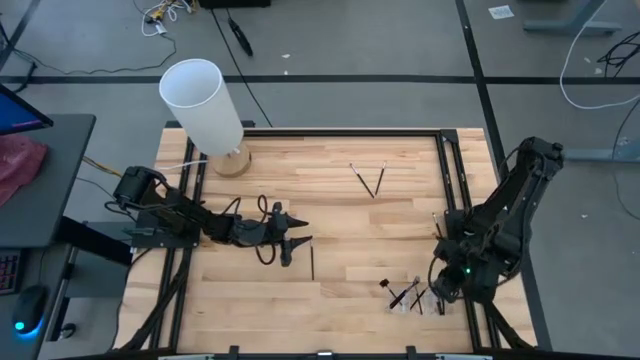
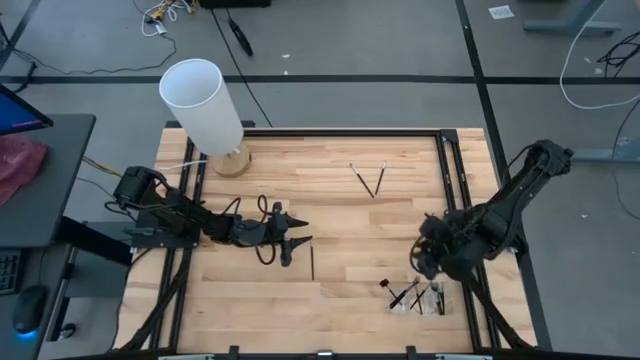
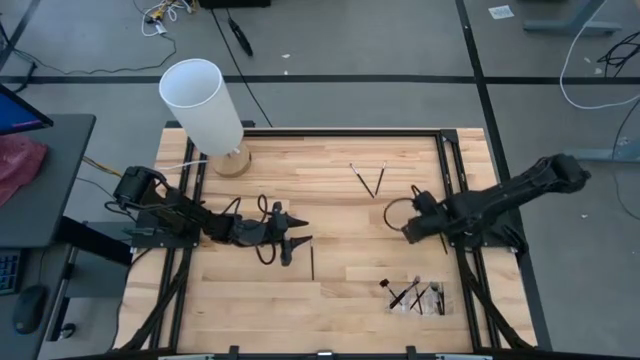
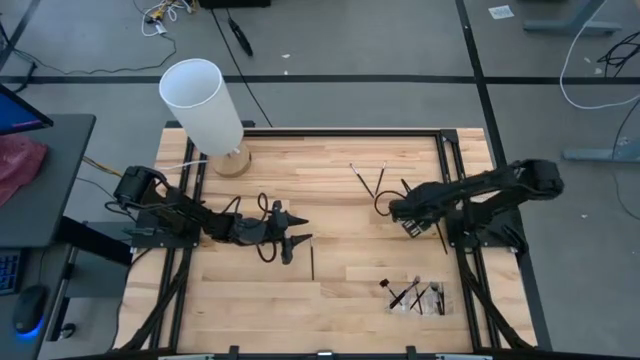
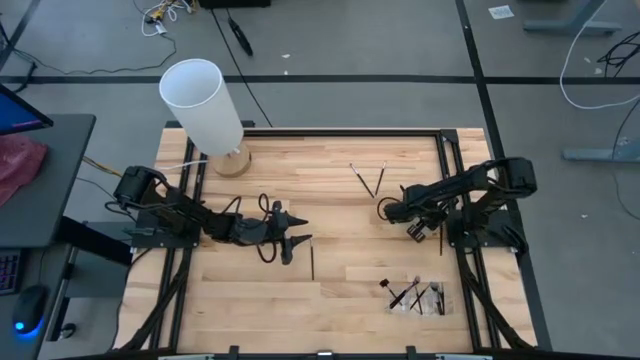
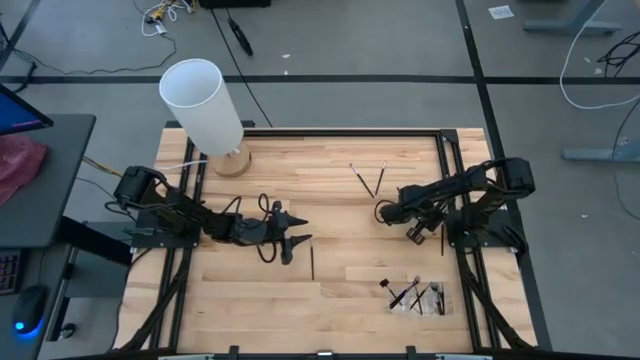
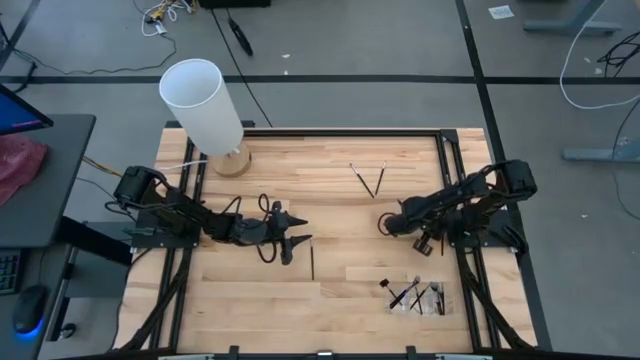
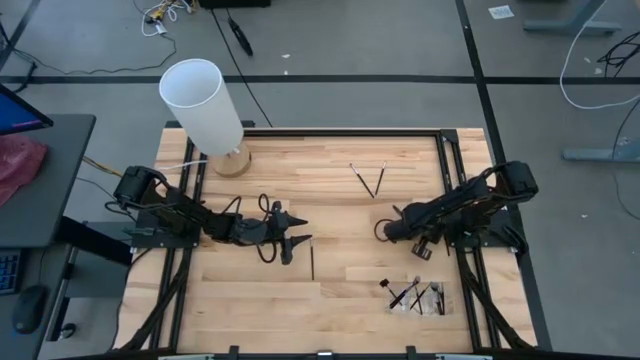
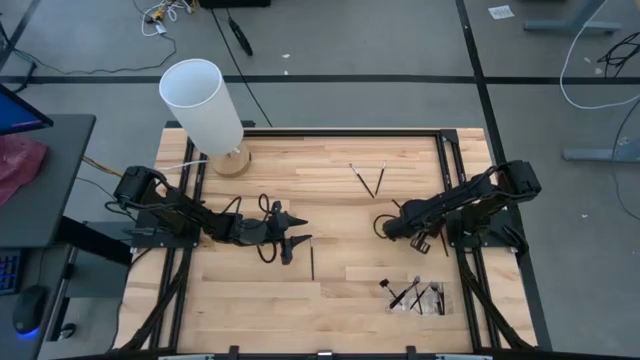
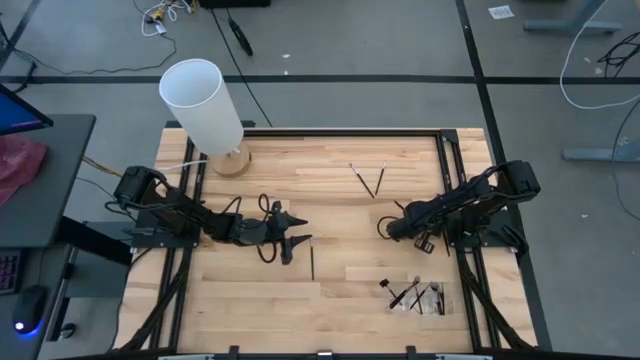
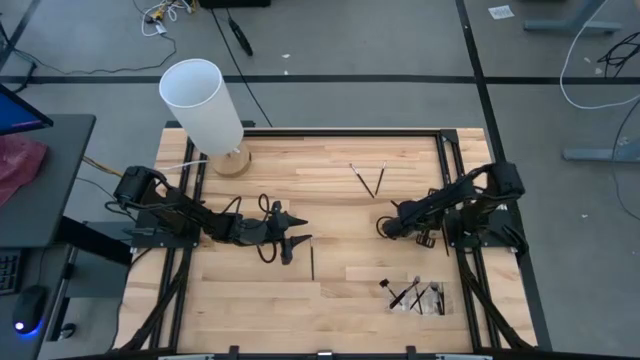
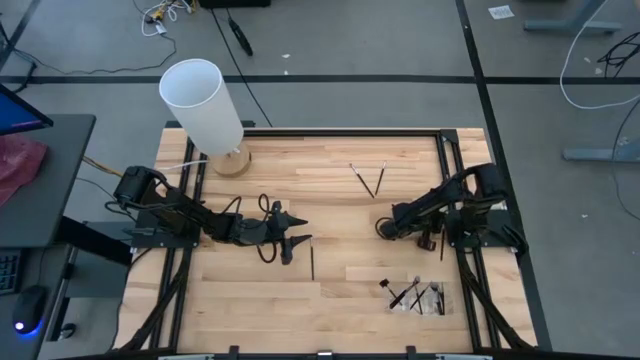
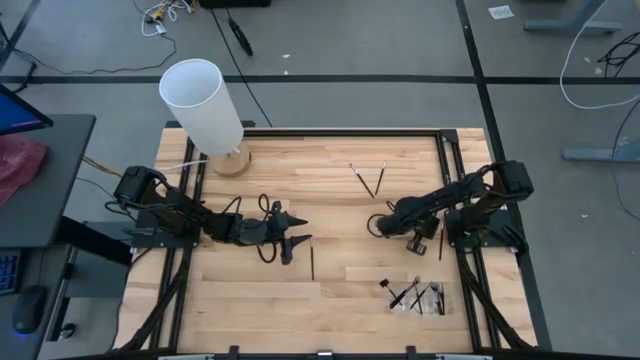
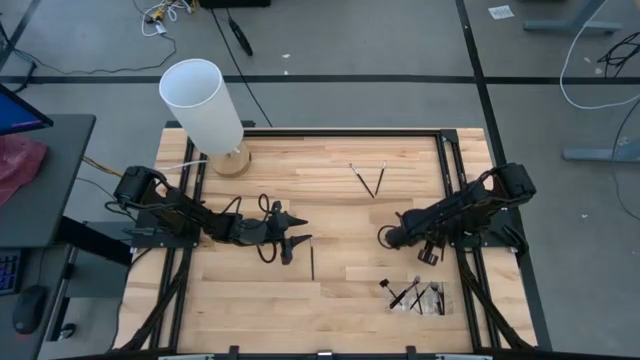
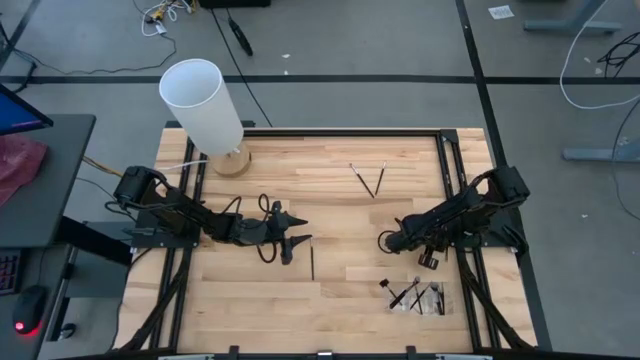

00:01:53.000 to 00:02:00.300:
Task: Pick & Place Makeup Supplies
Put the silver makeup brush into the transparent organizer

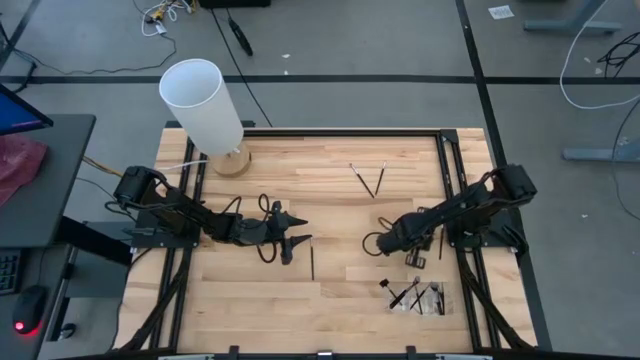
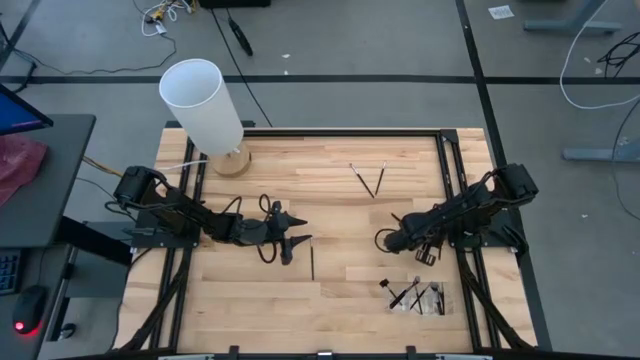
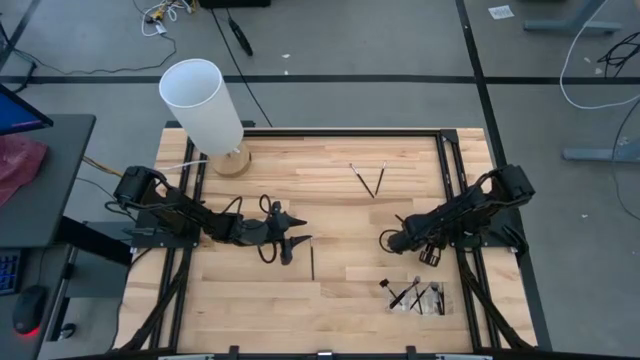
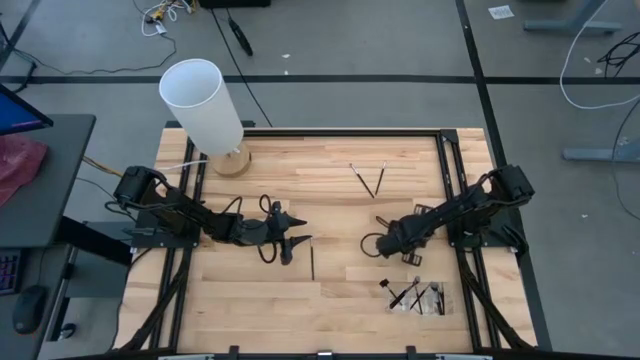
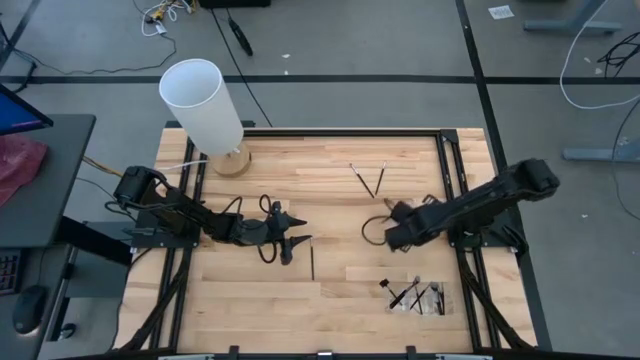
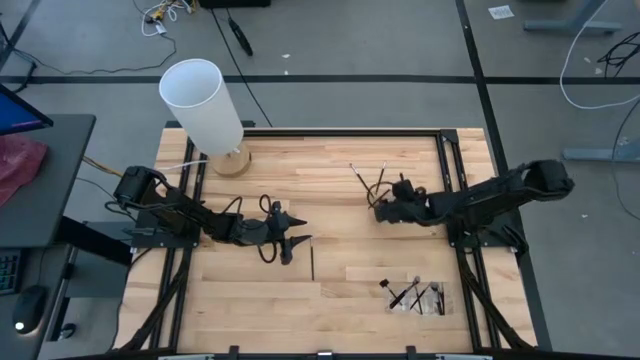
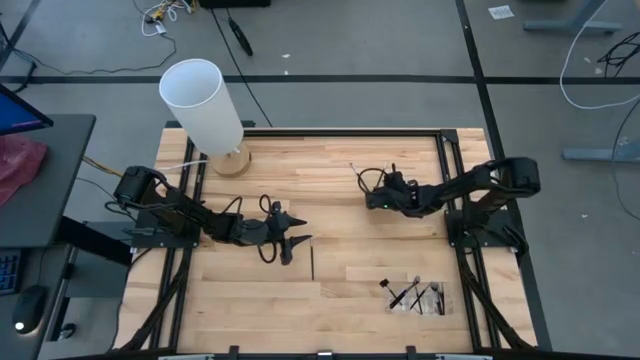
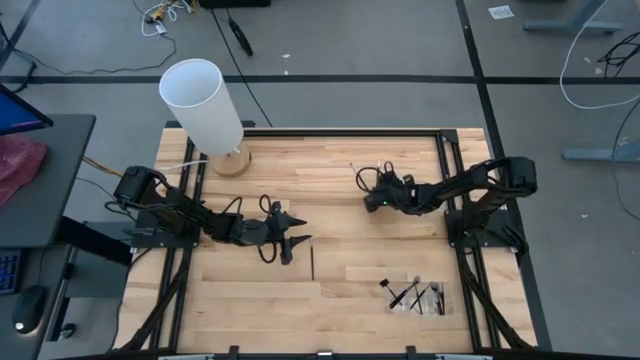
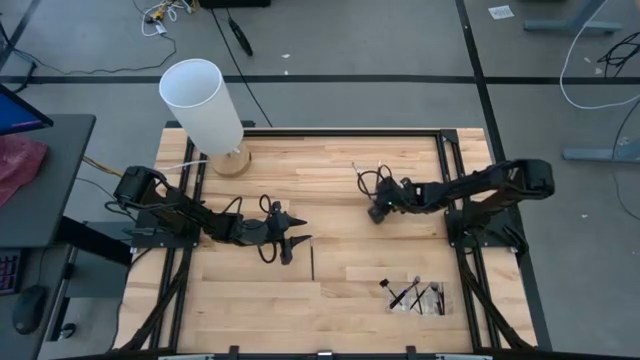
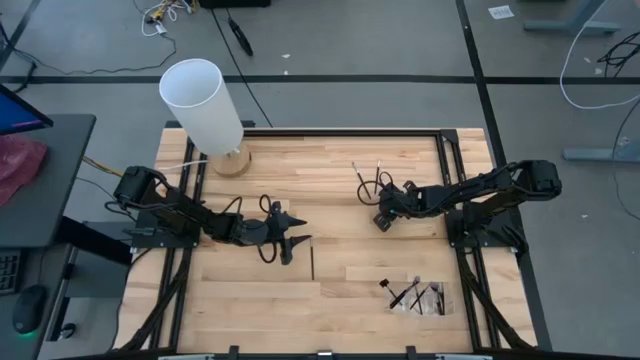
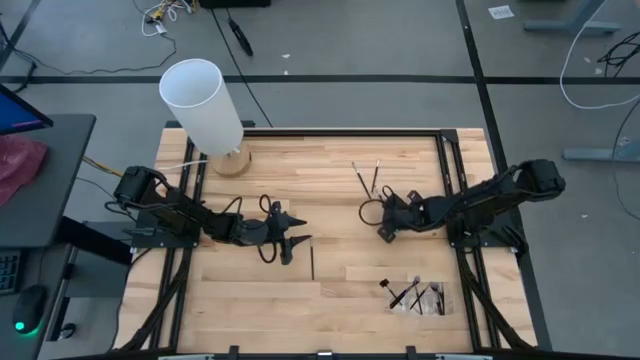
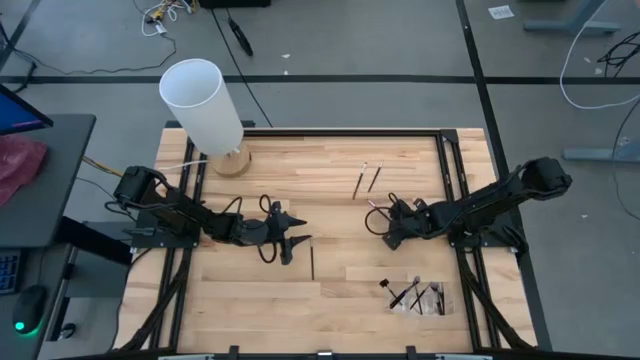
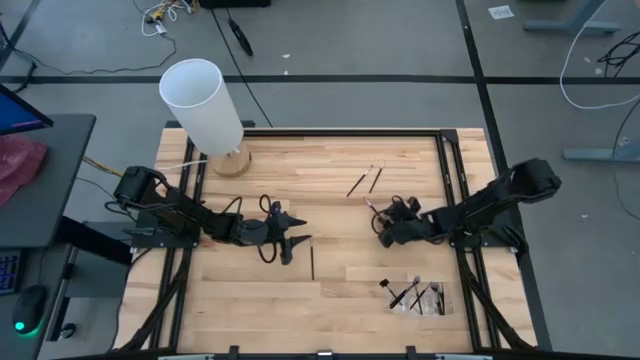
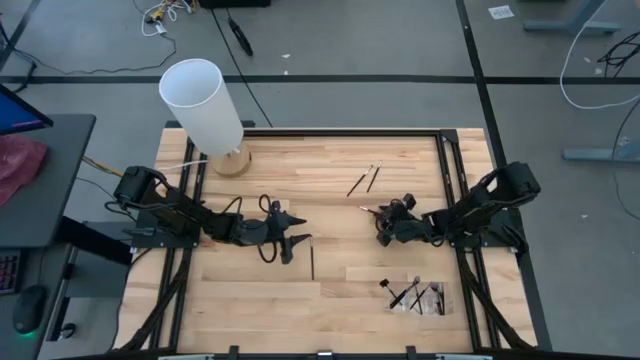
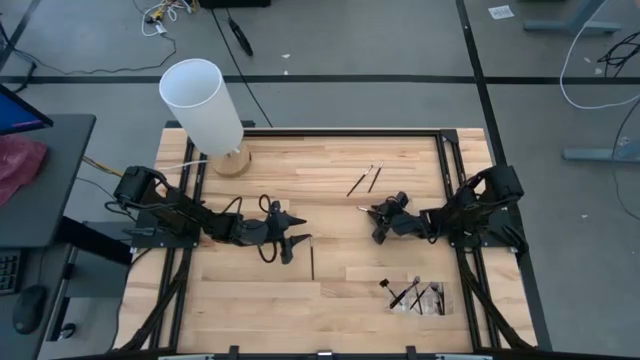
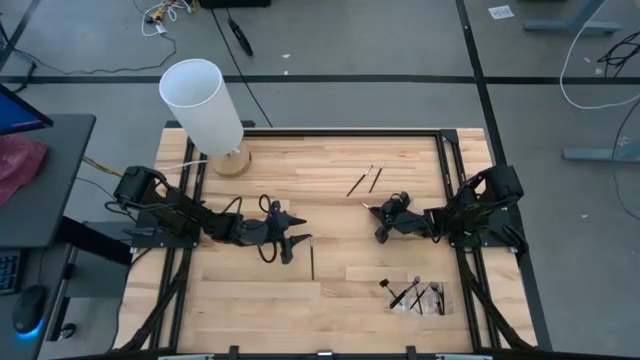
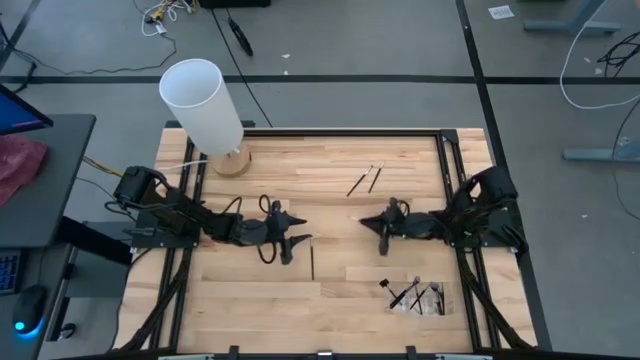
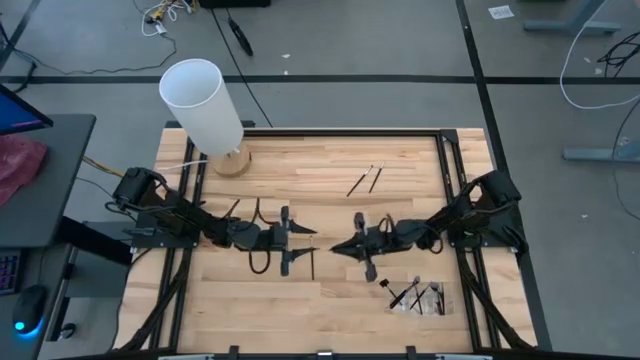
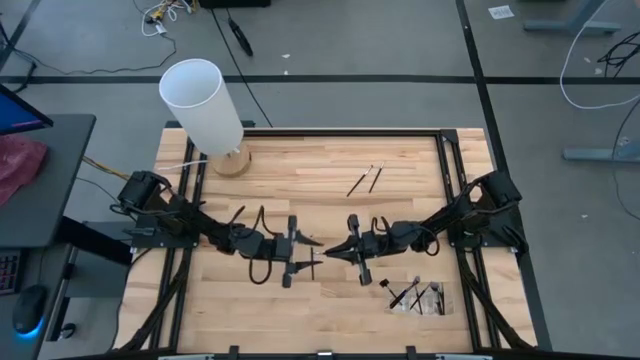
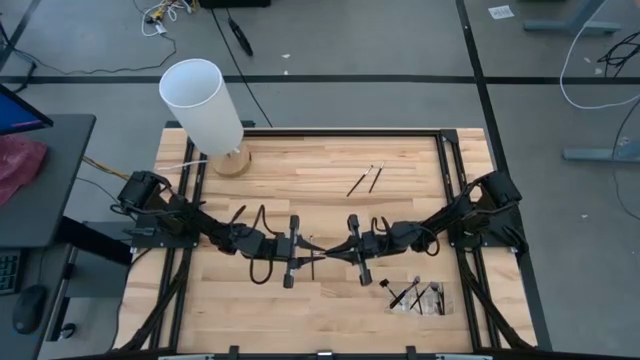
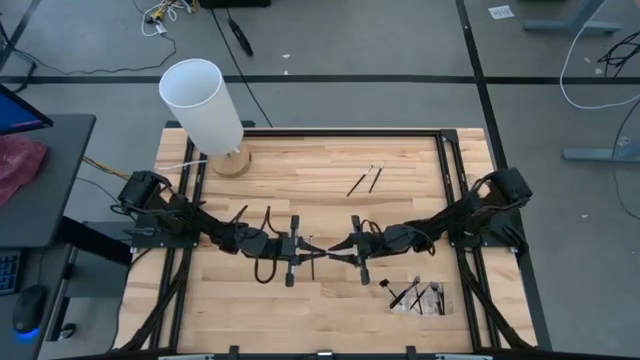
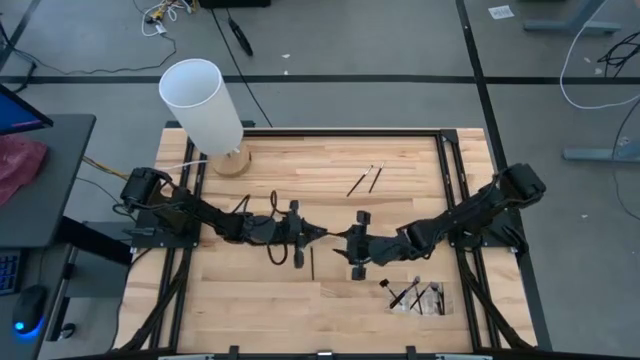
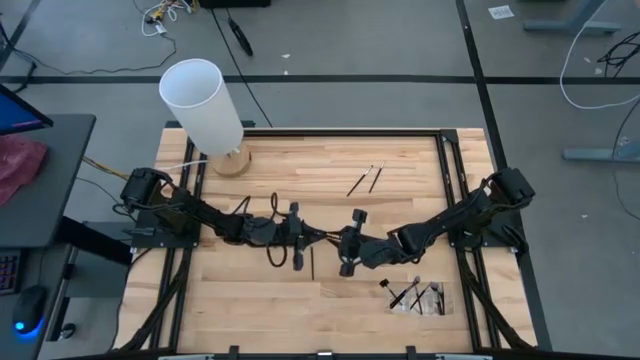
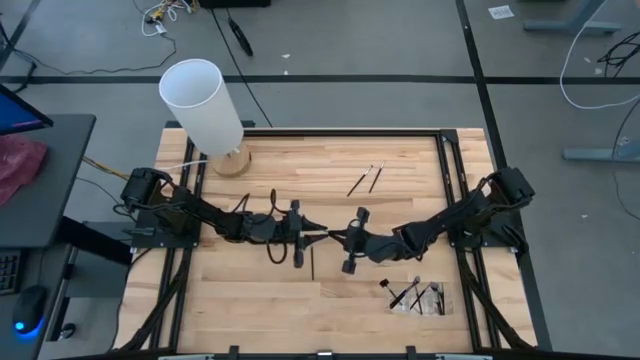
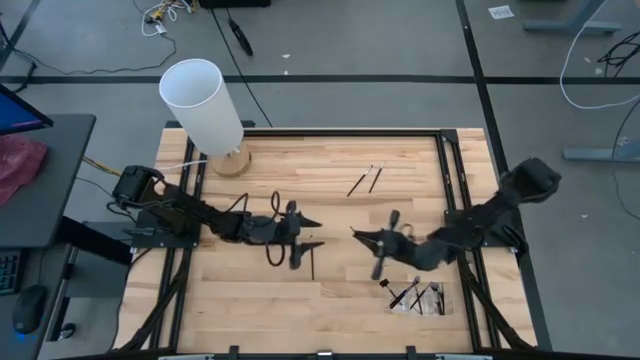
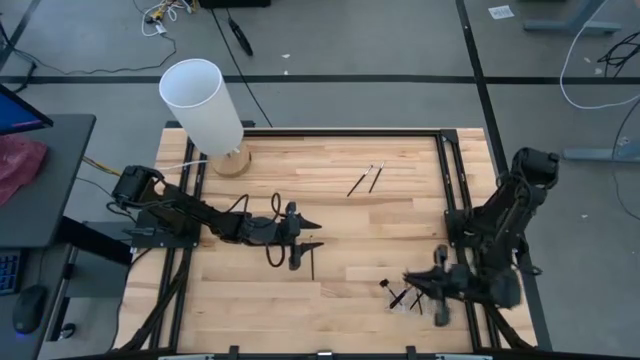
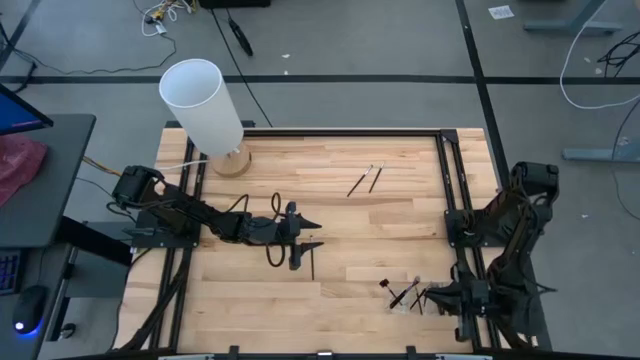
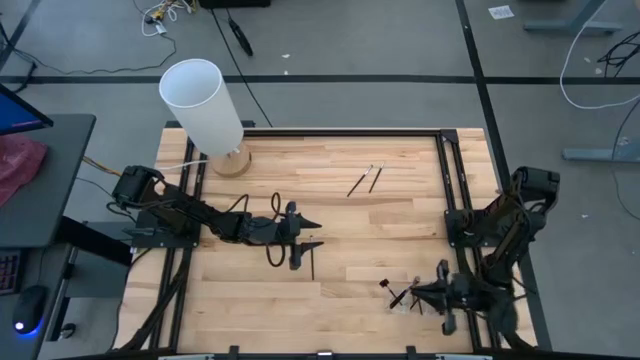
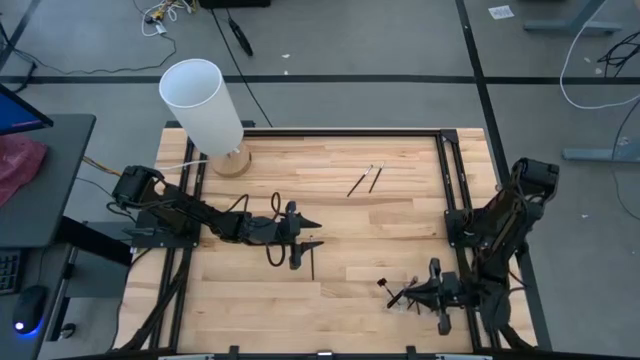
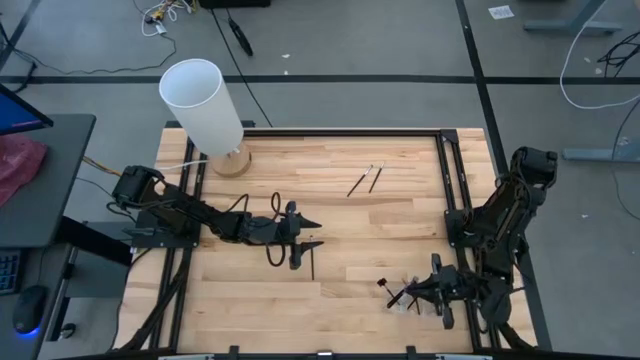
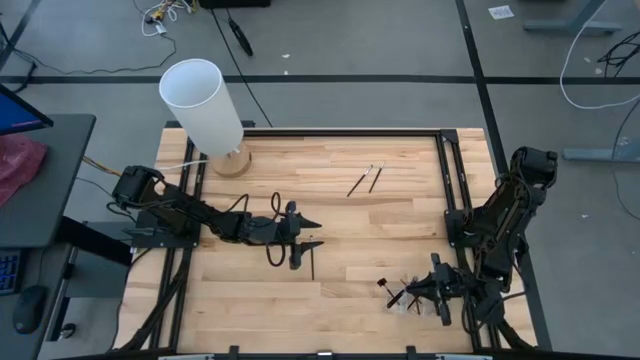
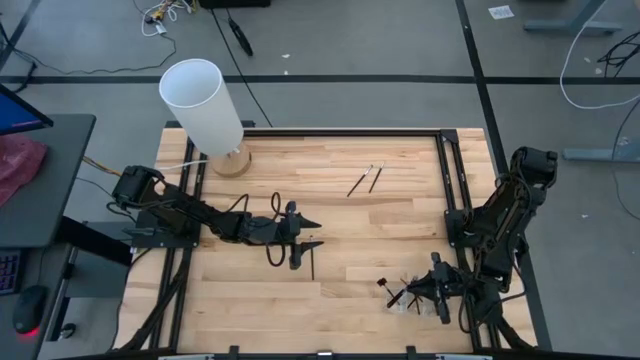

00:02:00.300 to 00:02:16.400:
Put the silver makeup brush into the transparent organizer
